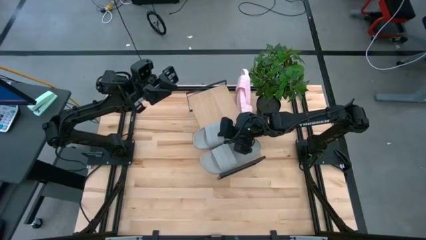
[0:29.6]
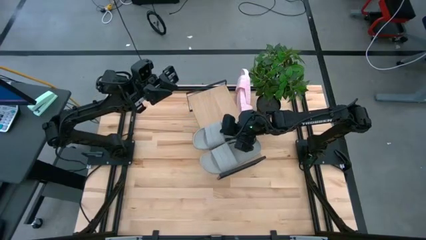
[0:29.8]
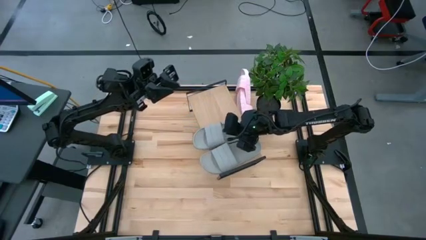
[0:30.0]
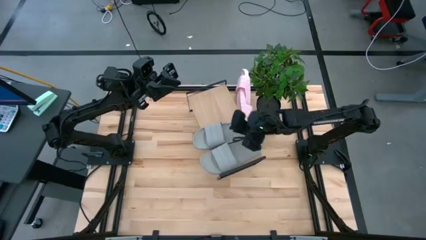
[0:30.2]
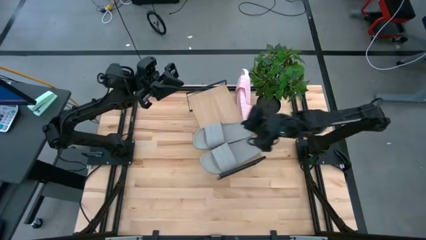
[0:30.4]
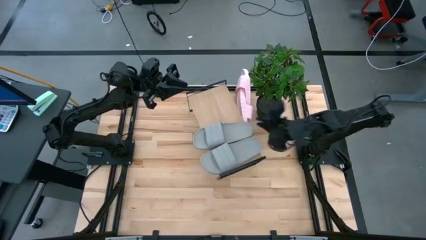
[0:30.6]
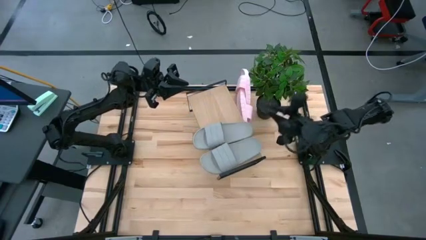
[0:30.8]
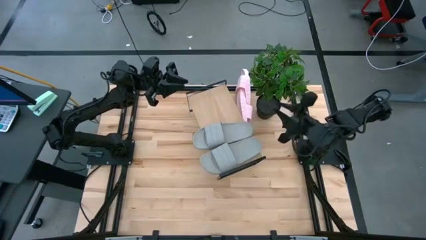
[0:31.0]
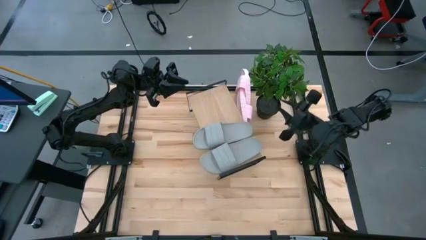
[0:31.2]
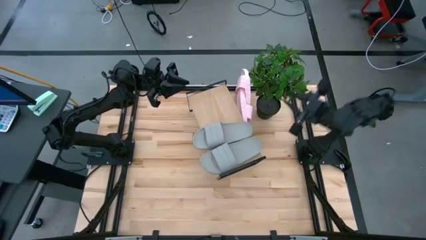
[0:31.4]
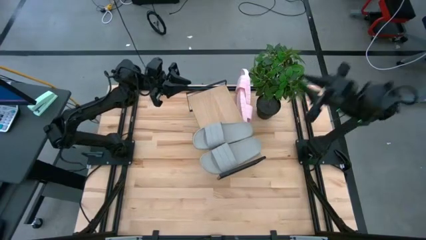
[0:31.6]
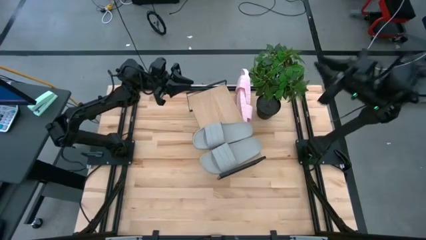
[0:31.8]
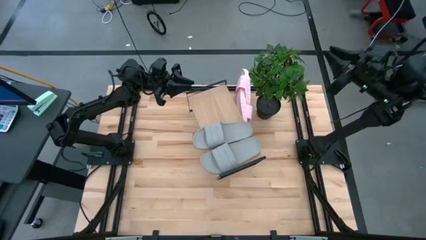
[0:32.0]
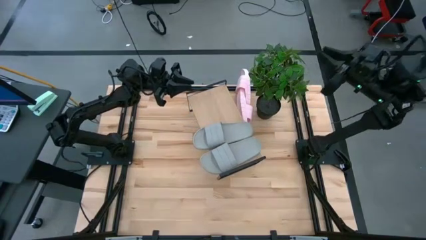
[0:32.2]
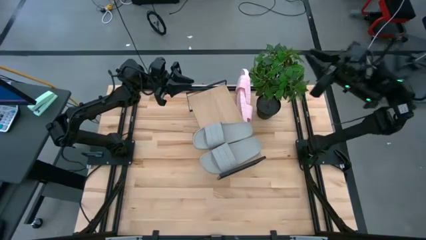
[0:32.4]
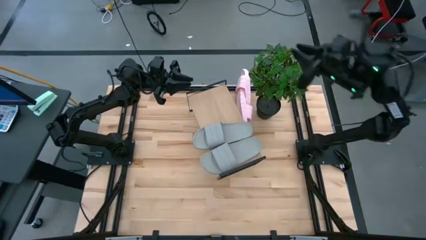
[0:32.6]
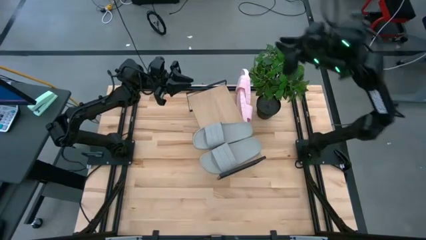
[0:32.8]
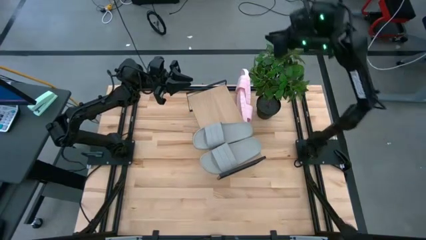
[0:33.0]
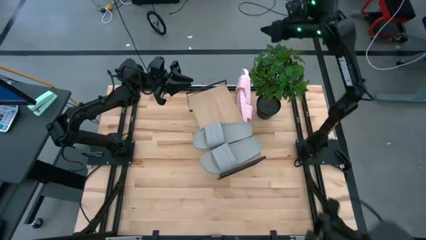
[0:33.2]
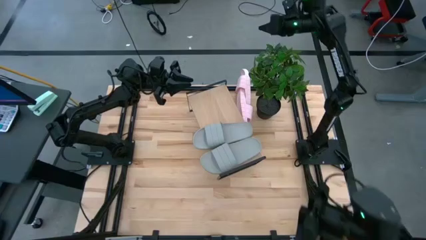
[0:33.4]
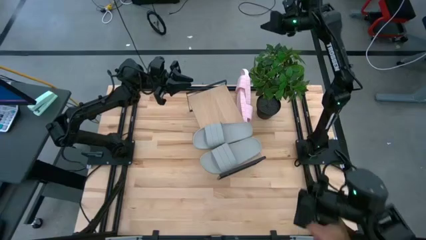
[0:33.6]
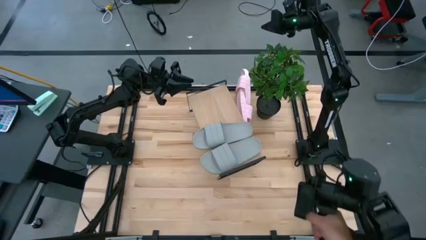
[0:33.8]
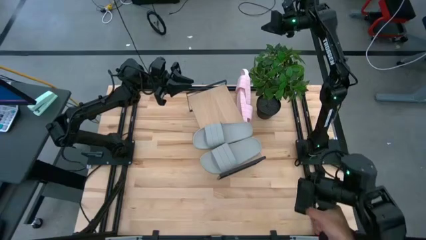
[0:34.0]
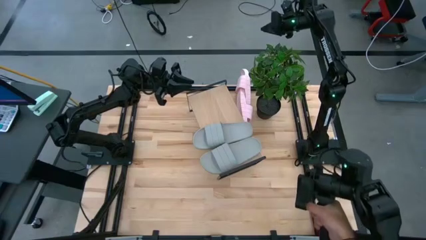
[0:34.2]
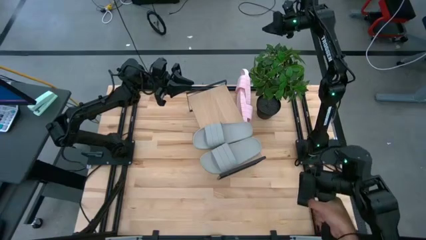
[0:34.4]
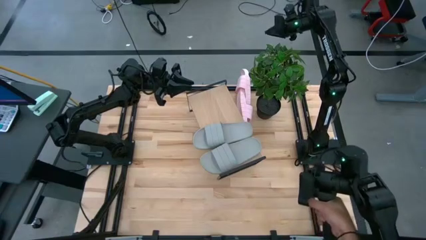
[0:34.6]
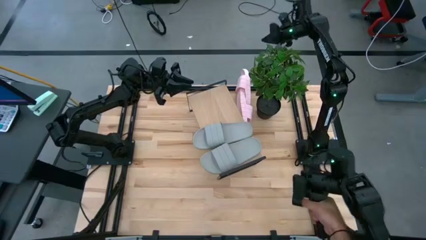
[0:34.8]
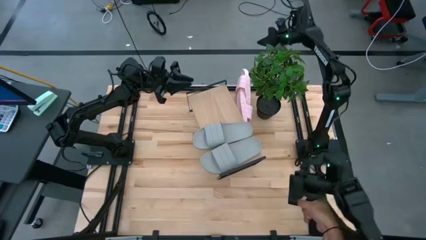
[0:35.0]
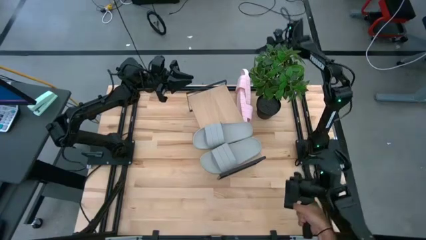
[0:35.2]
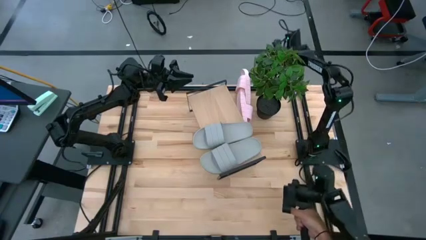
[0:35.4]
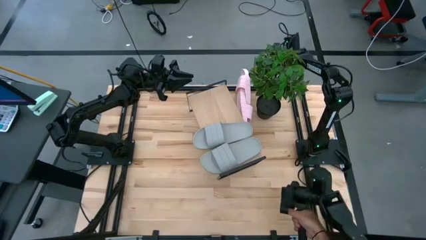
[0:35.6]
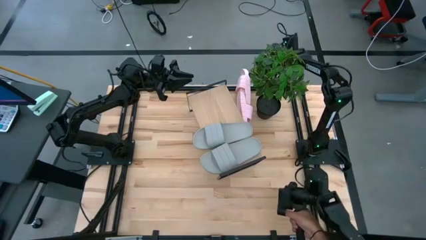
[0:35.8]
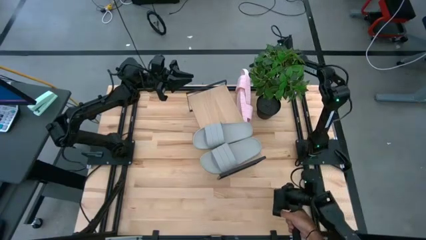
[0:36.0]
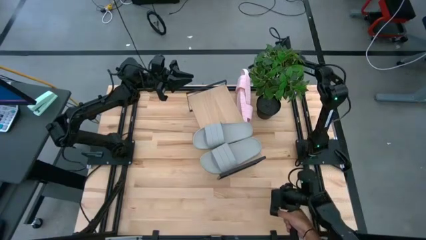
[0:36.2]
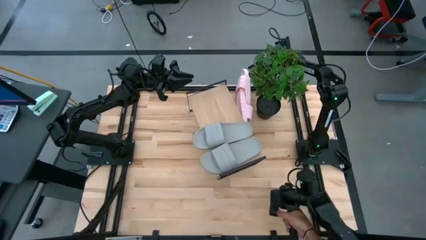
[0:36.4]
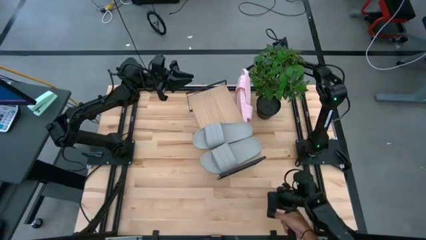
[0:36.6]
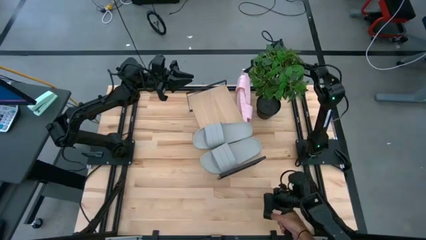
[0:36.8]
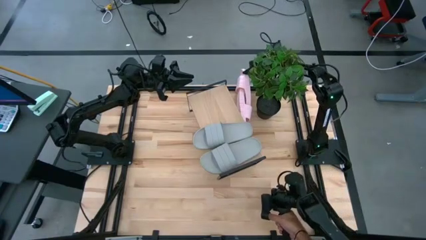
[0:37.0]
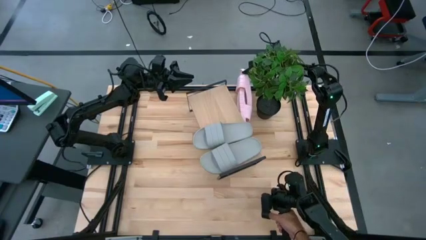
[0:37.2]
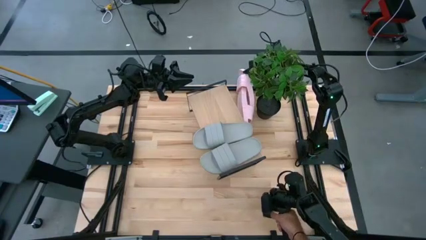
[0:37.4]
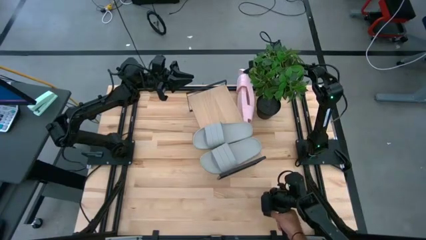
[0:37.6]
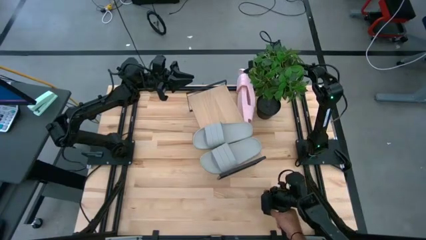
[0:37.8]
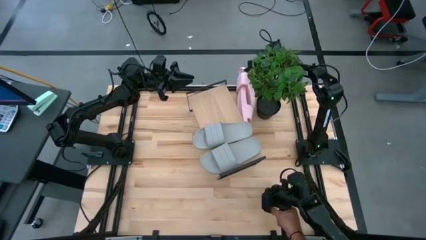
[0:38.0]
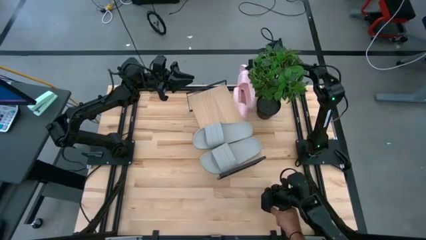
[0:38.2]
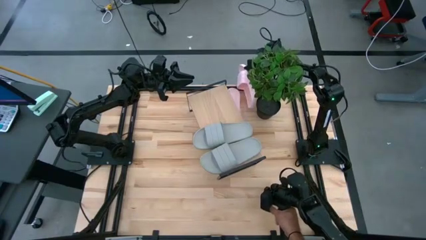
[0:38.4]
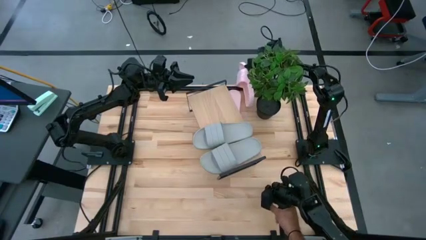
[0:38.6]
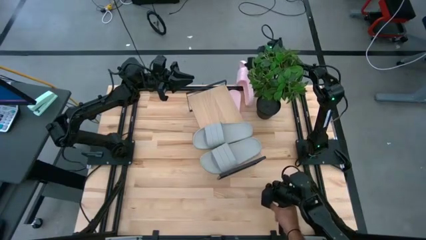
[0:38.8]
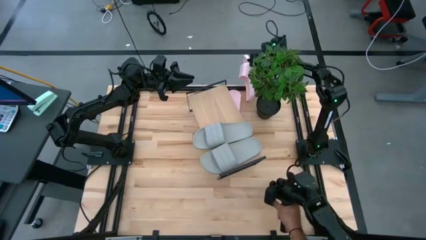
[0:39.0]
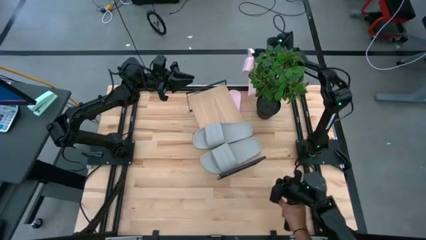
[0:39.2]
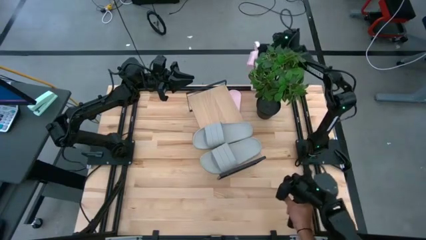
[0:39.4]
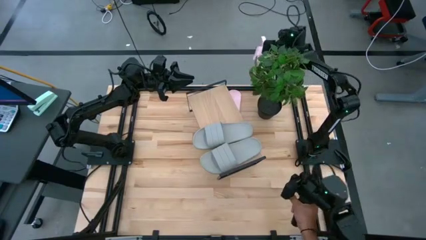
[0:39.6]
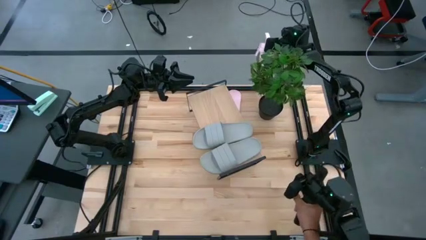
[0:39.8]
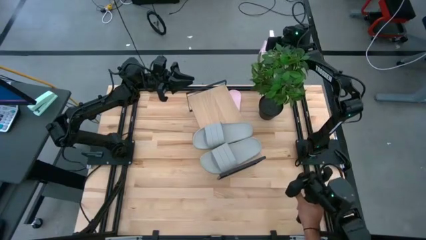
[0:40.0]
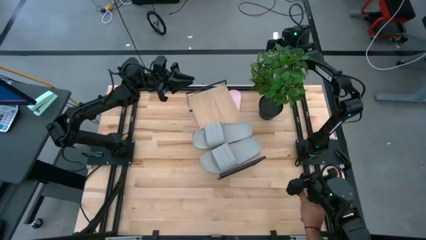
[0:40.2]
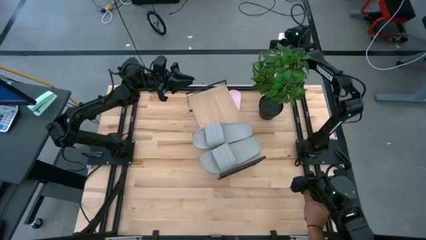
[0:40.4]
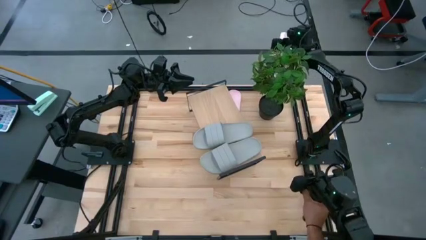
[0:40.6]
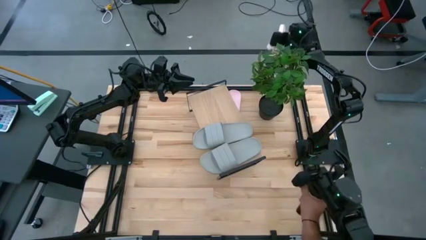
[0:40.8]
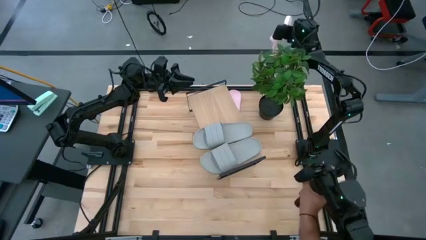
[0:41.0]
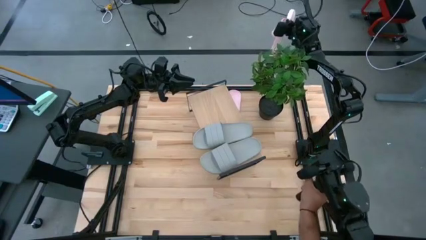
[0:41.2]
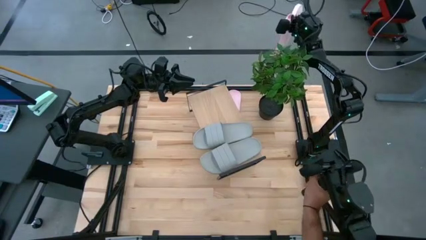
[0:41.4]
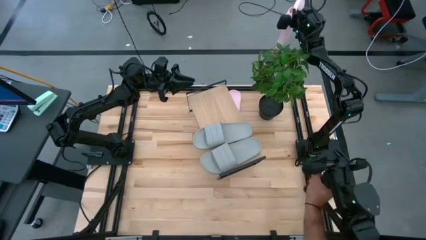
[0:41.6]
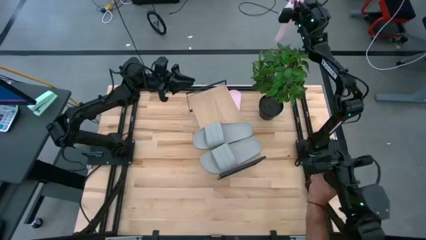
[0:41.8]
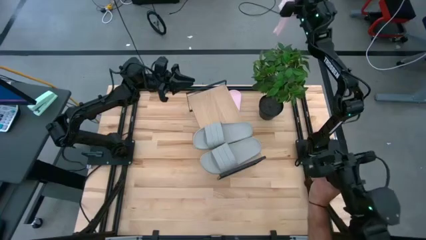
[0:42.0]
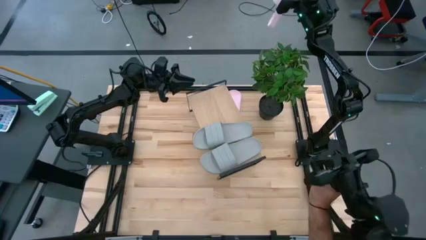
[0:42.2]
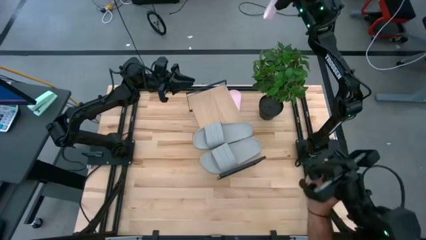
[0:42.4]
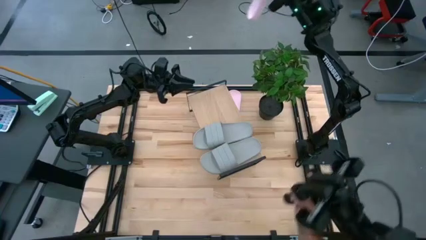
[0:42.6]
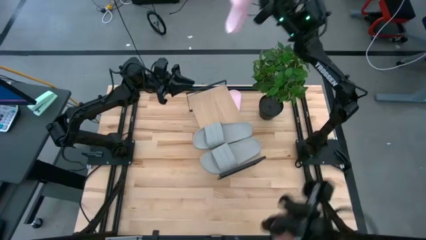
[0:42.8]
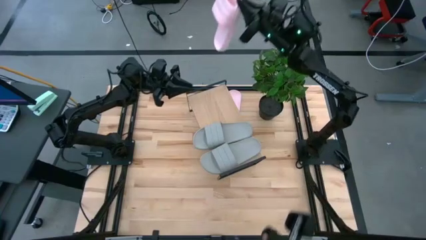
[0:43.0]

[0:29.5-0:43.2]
Task: Pick and place slides into the shelf
Put the top pink slipper on the shelf

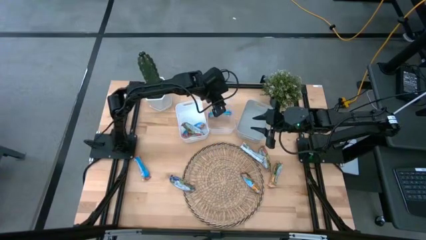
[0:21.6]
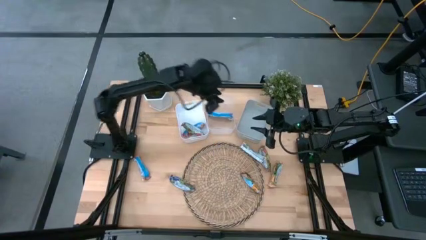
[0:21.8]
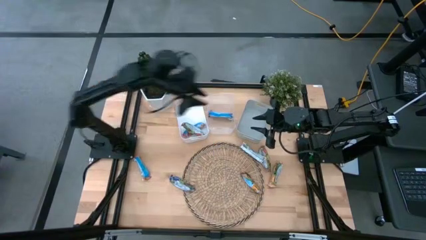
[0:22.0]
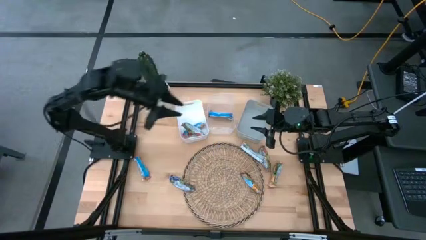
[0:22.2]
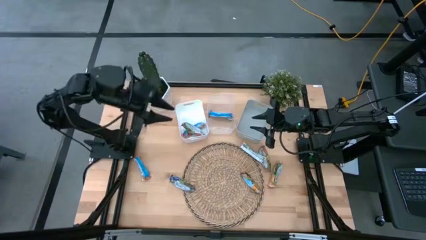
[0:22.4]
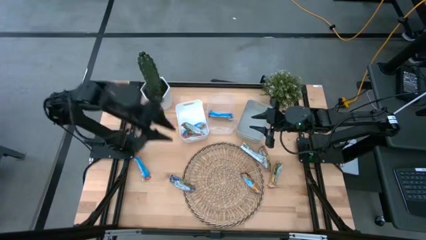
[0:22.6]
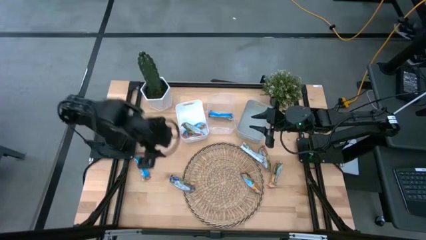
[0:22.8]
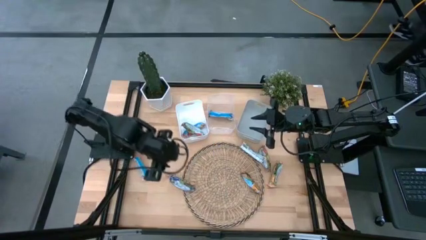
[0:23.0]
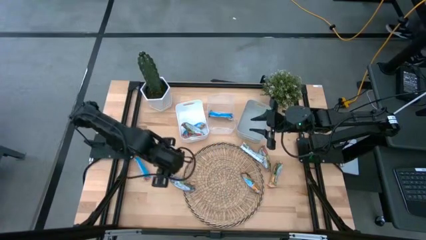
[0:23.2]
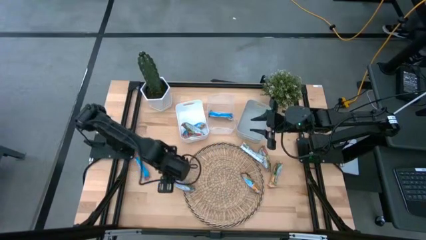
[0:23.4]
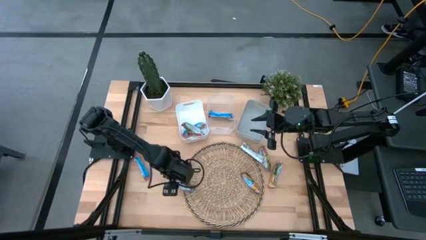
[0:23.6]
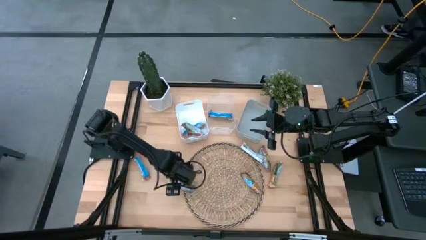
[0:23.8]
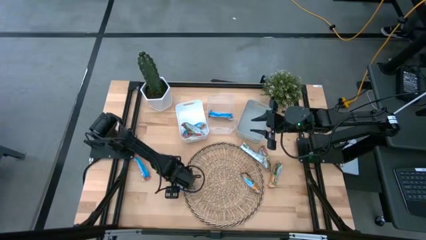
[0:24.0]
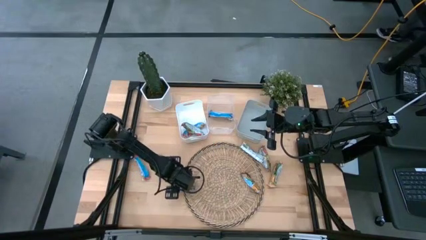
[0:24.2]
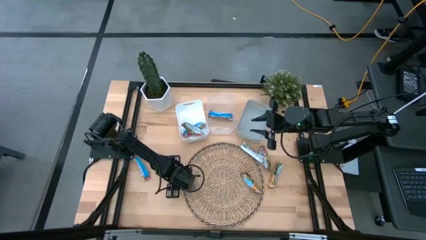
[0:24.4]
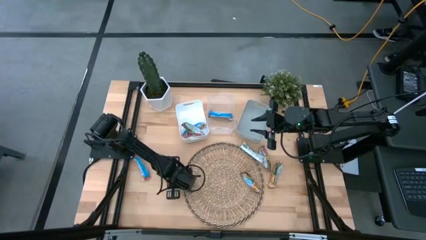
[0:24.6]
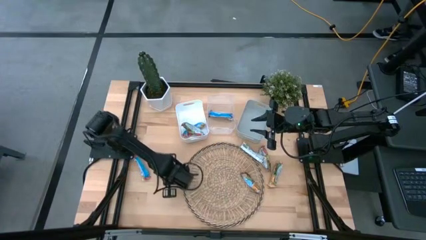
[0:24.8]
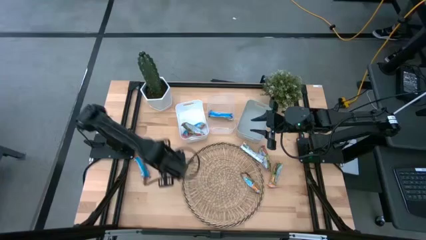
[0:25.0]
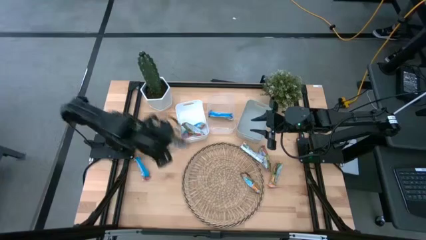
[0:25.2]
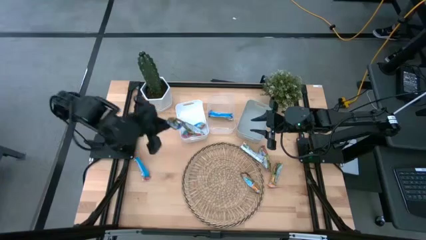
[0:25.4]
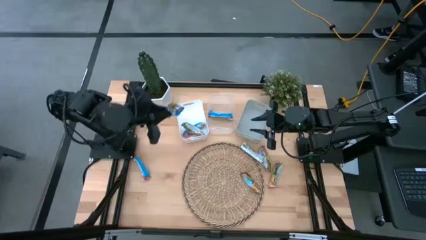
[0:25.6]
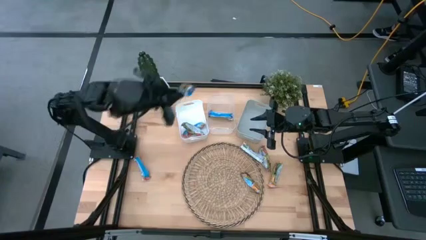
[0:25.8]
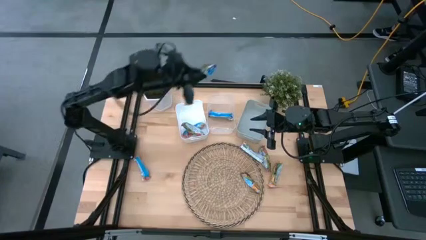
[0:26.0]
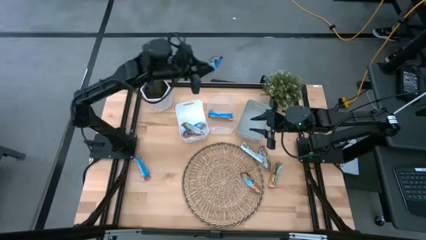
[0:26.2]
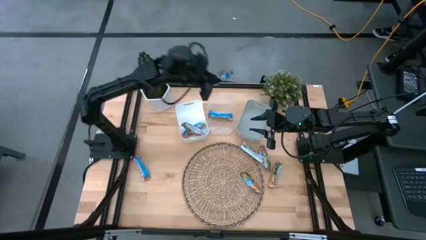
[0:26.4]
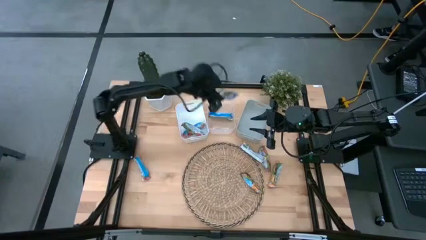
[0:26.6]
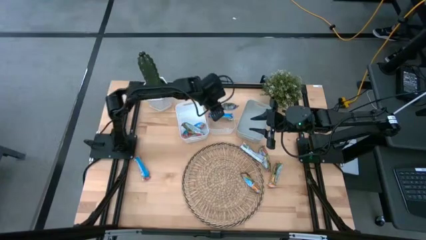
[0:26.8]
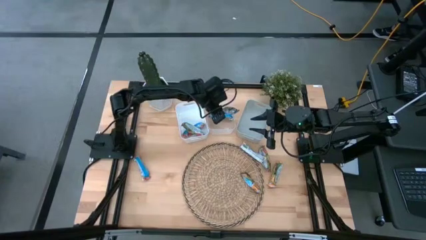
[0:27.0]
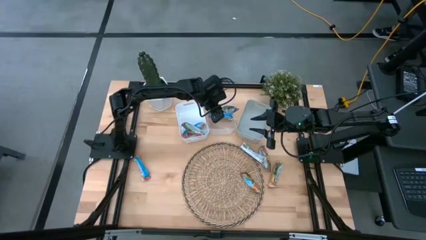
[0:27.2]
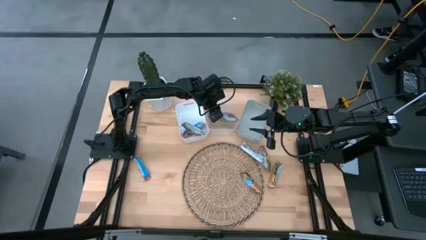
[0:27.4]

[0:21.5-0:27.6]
Task: Pick and place Granola Bars by type
Put the blue granola bar into the transparent bin
